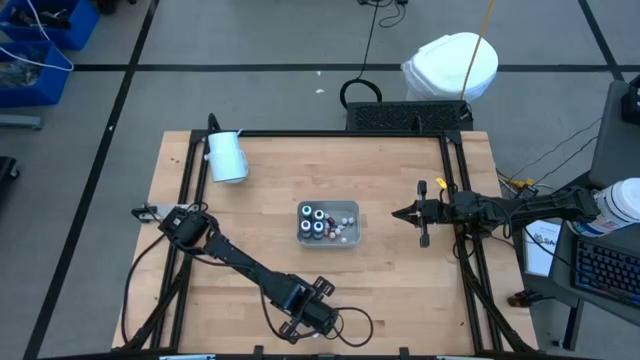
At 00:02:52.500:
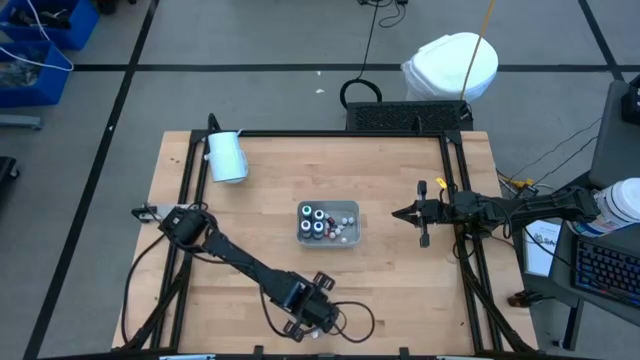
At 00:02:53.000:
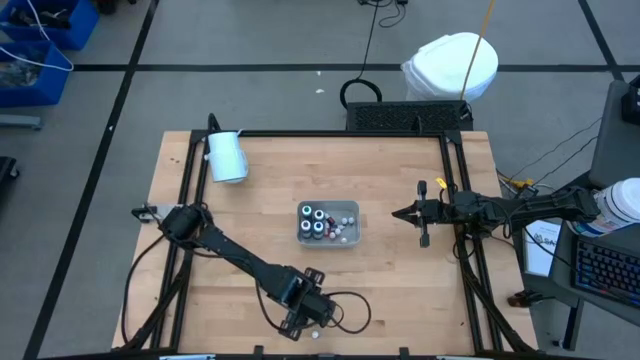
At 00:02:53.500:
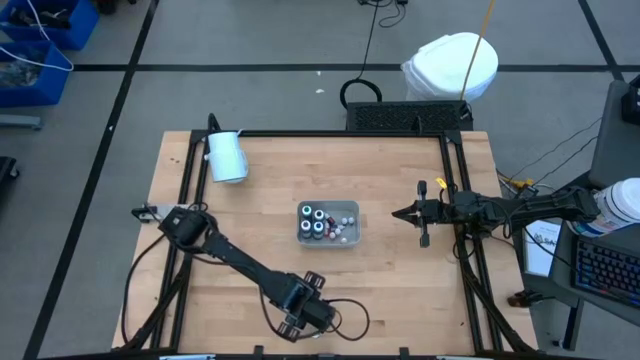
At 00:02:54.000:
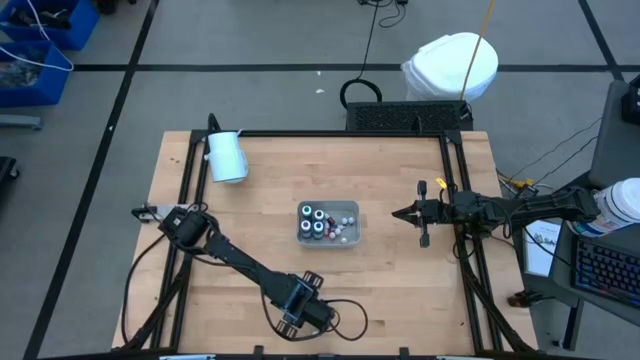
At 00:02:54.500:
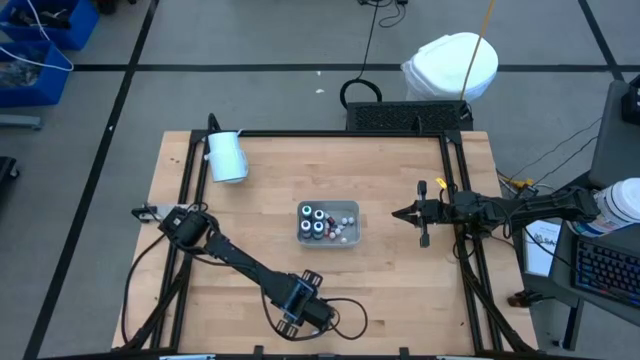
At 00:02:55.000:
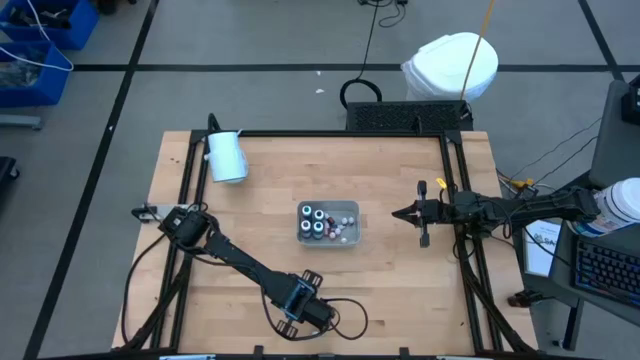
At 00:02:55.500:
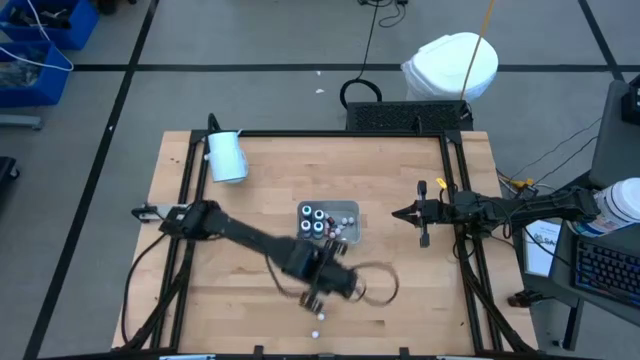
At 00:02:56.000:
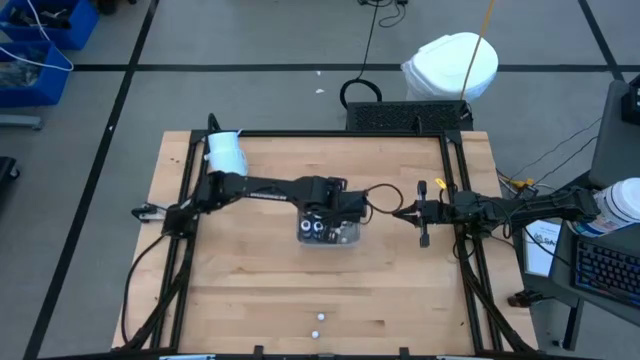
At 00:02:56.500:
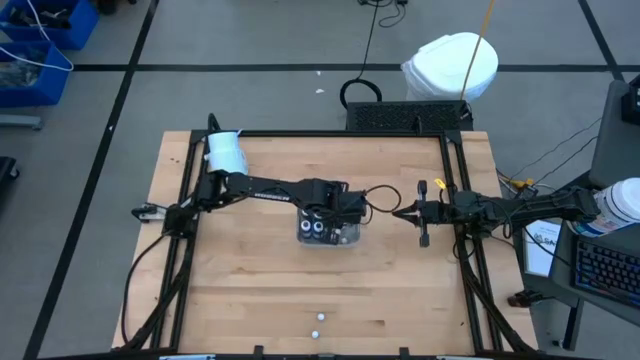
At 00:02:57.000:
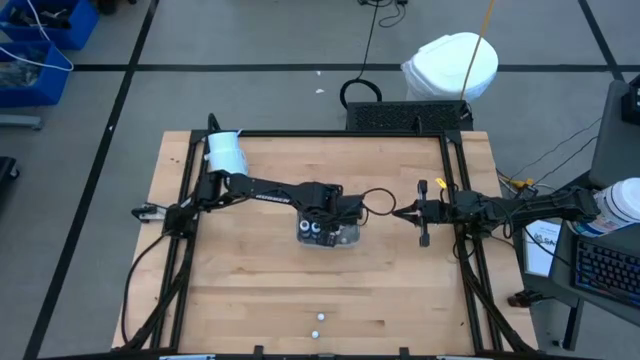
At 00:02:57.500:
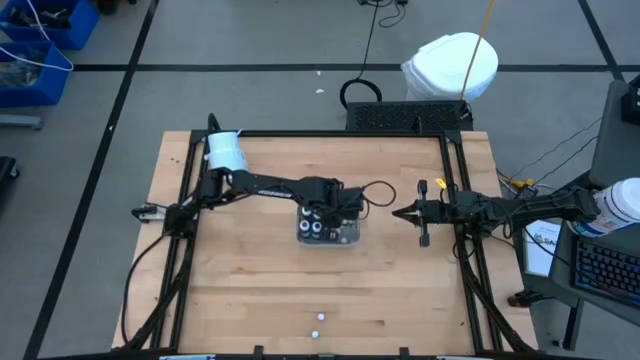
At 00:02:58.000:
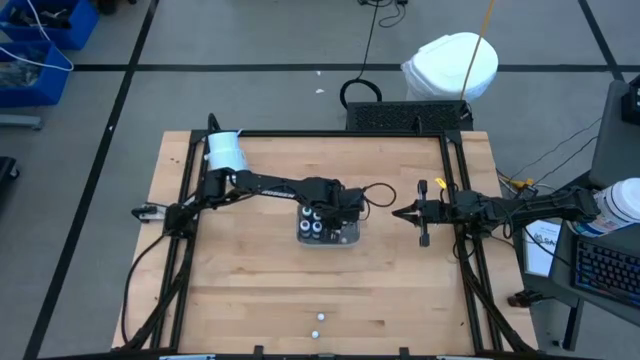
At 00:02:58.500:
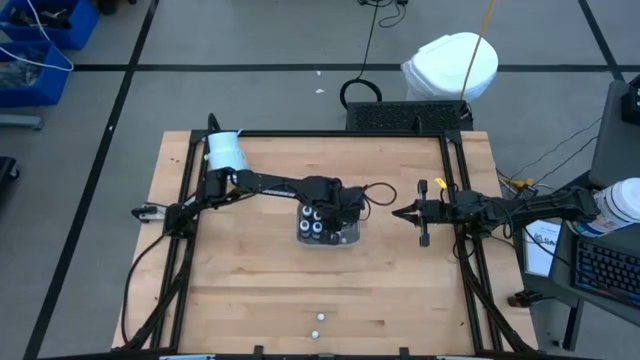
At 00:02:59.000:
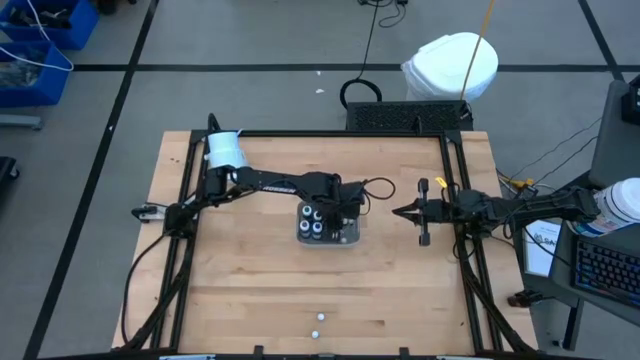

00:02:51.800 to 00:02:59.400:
Task: Pick & Place food coloring
Put the small violet food coloring bottle into the gray bin

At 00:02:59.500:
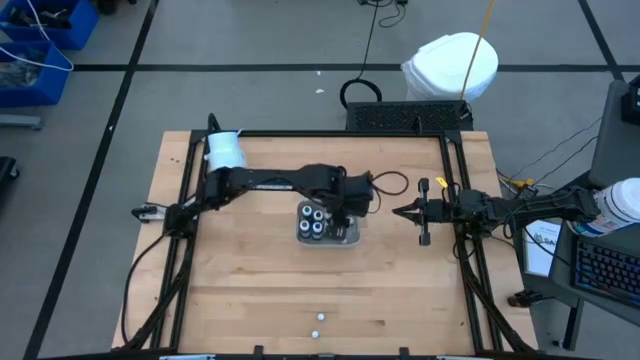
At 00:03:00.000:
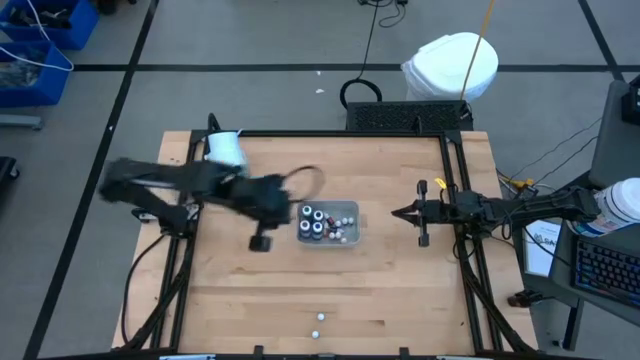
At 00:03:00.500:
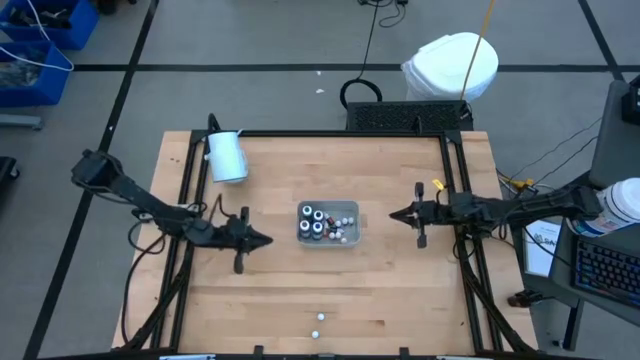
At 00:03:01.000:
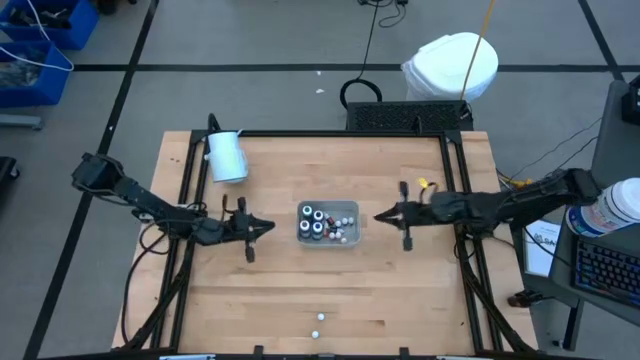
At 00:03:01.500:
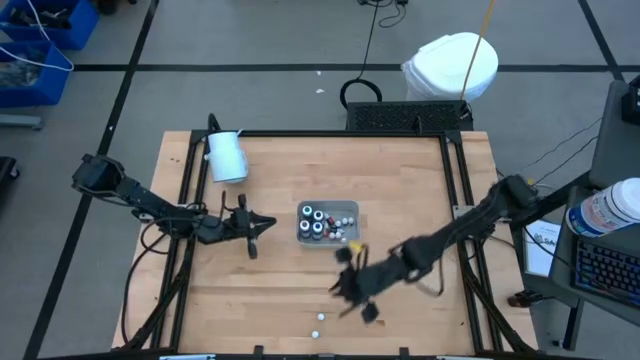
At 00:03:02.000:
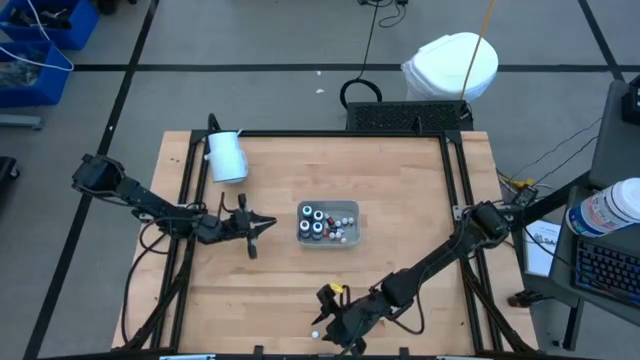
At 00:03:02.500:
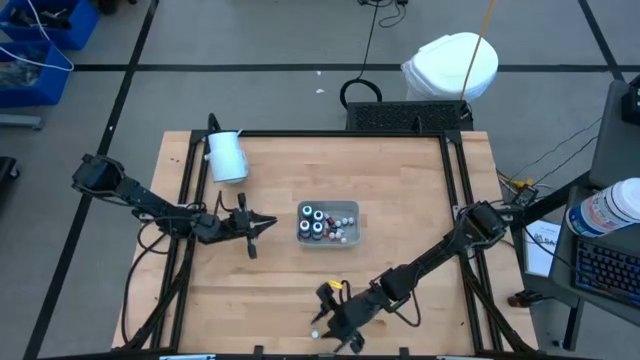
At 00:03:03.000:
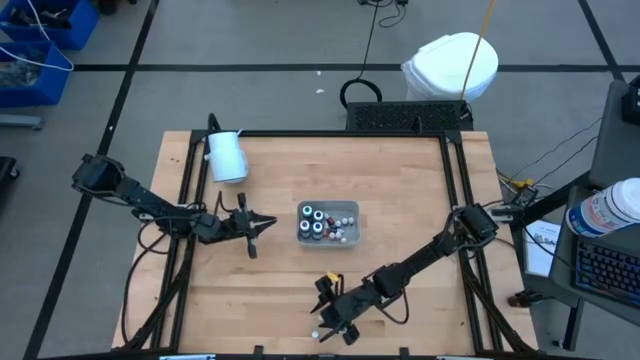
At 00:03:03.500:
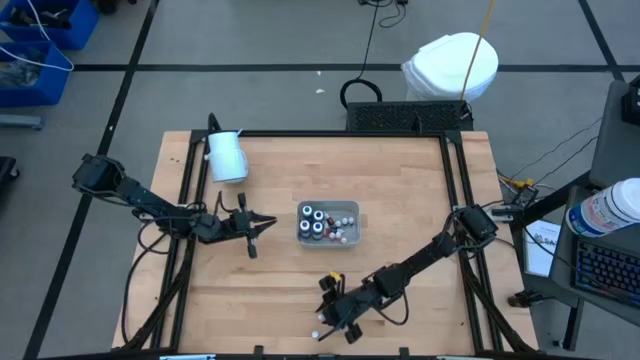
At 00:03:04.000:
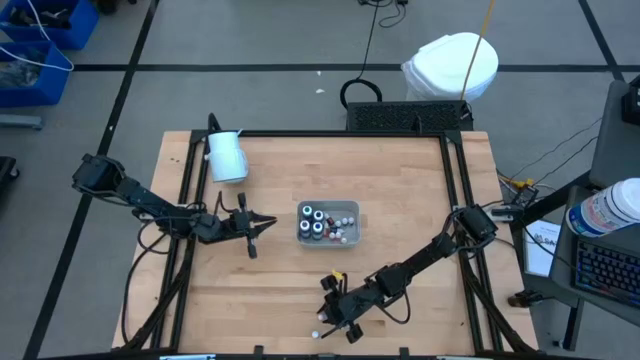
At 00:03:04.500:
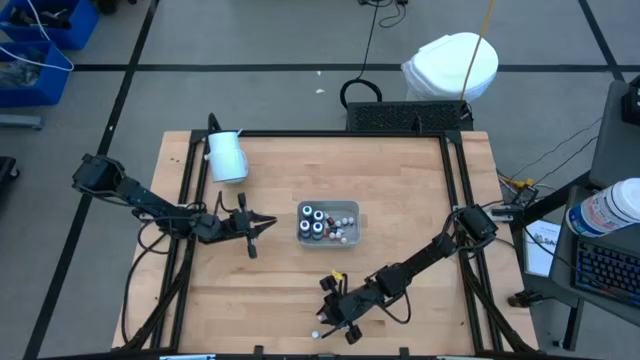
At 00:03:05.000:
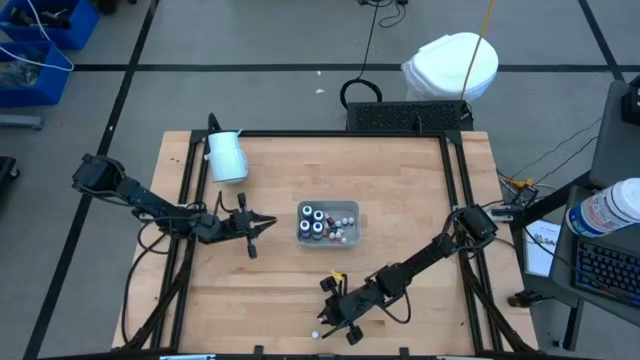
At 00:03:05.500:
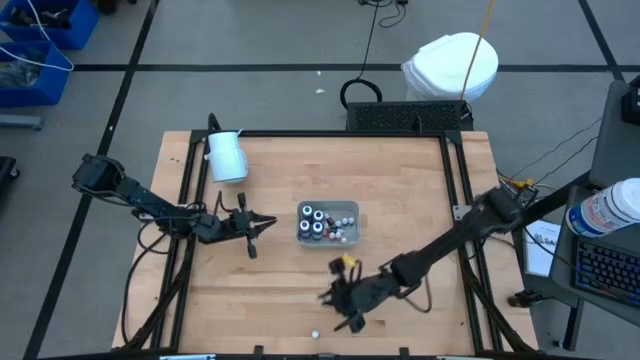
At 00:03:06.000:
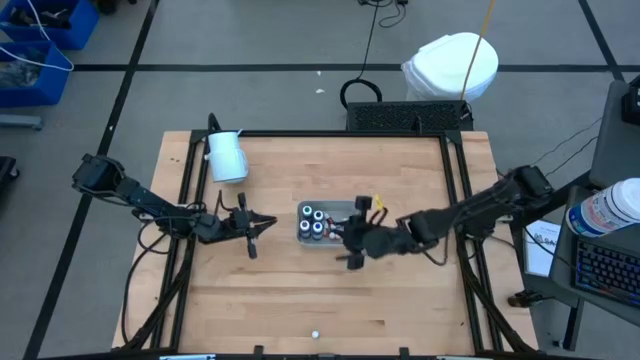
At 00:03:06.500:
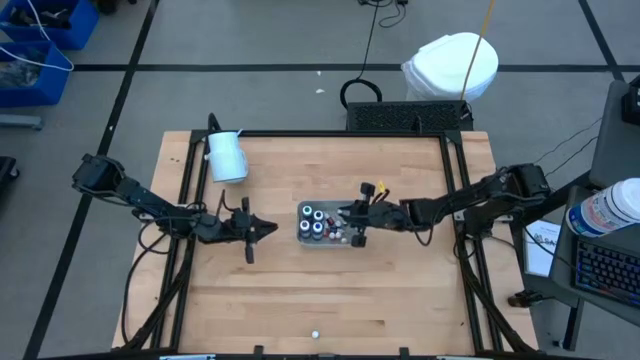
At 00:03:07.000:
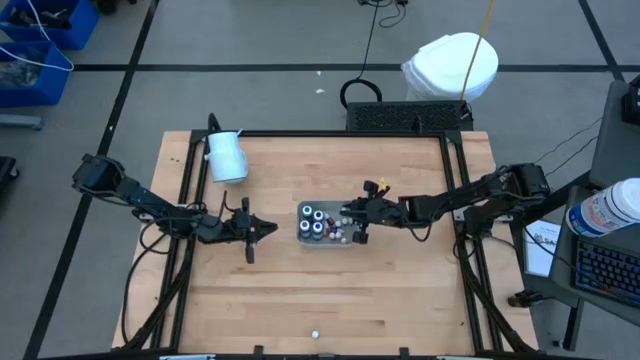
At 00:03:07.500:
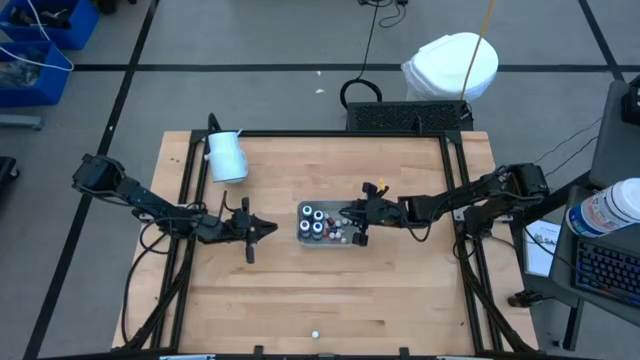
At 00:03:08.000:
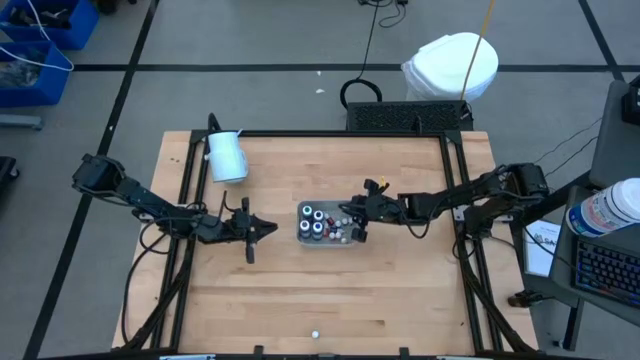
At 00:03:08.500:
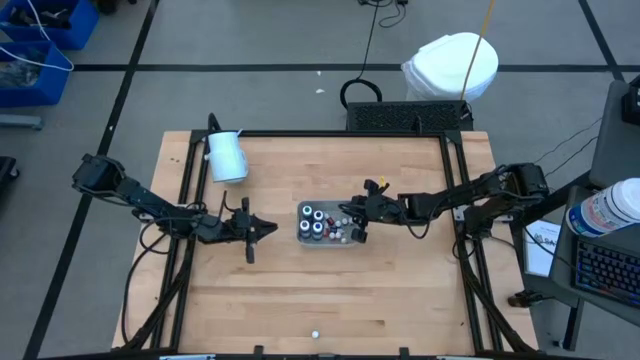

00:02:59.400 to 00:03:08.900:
Put the small blue food coloring bottle into the gray bin
